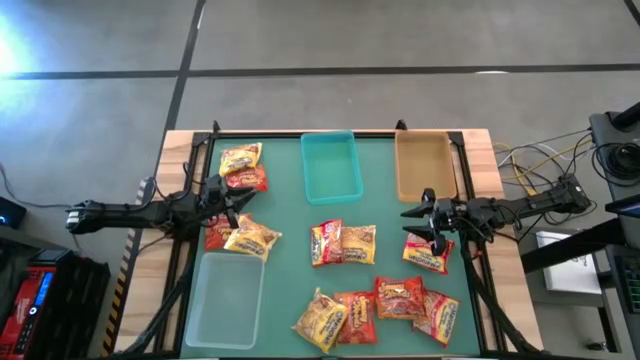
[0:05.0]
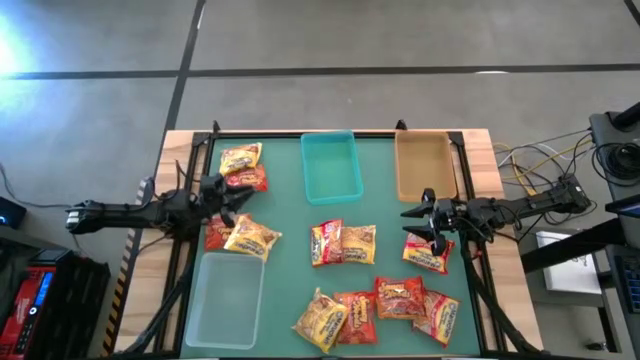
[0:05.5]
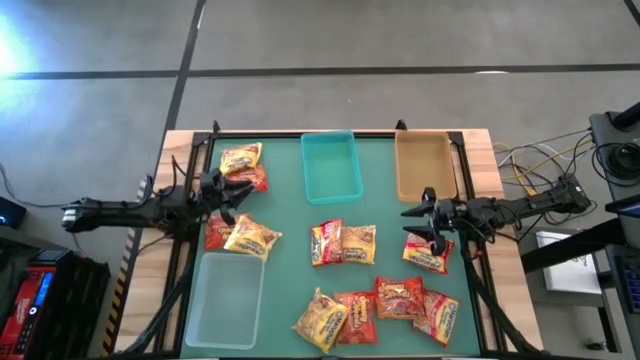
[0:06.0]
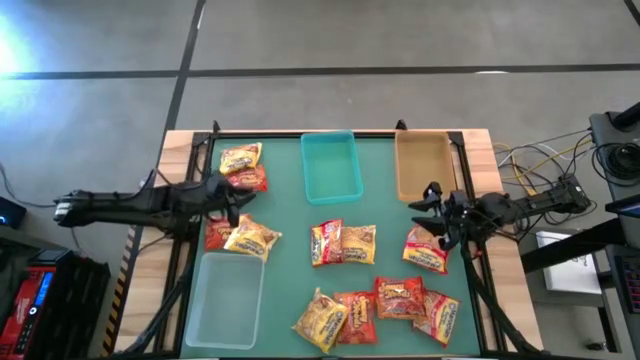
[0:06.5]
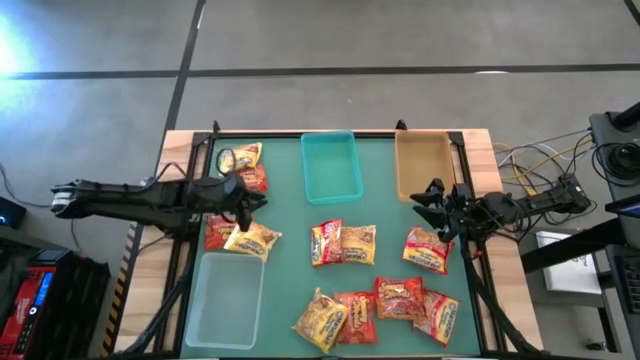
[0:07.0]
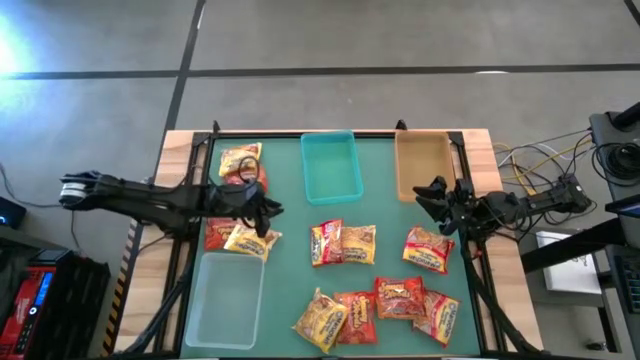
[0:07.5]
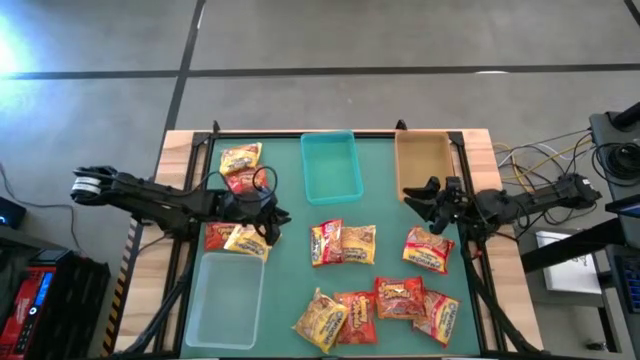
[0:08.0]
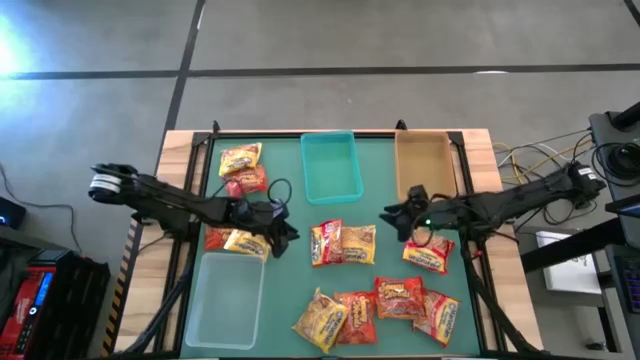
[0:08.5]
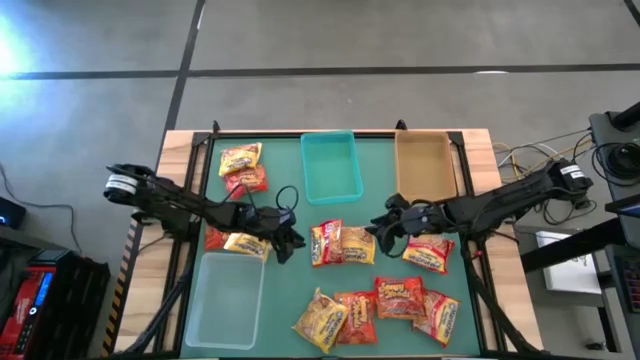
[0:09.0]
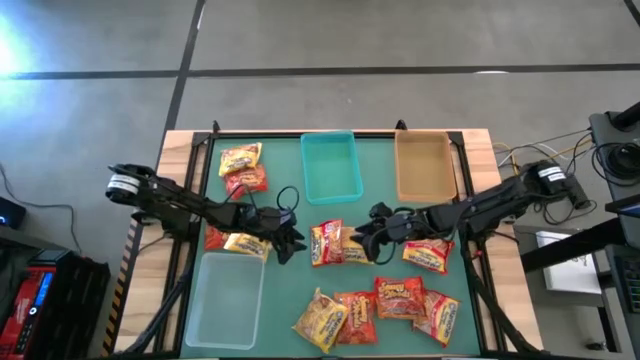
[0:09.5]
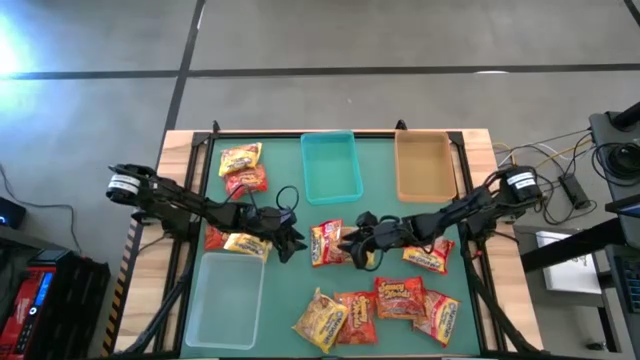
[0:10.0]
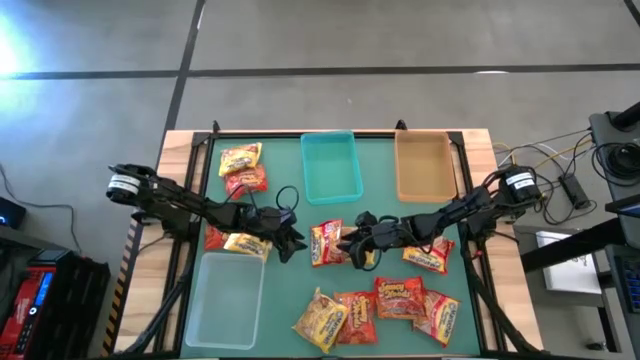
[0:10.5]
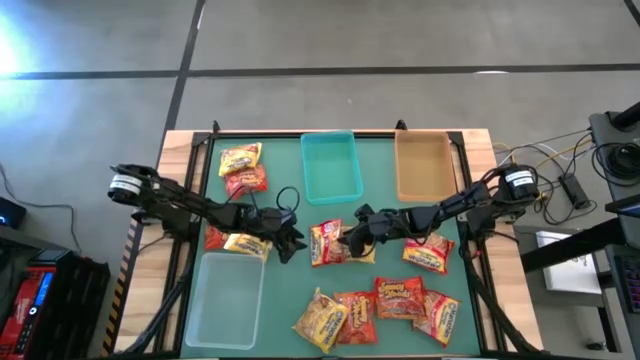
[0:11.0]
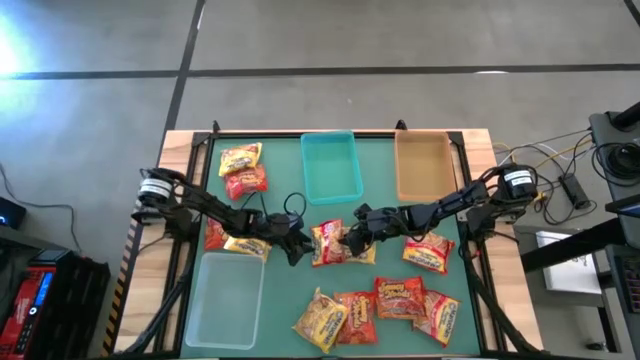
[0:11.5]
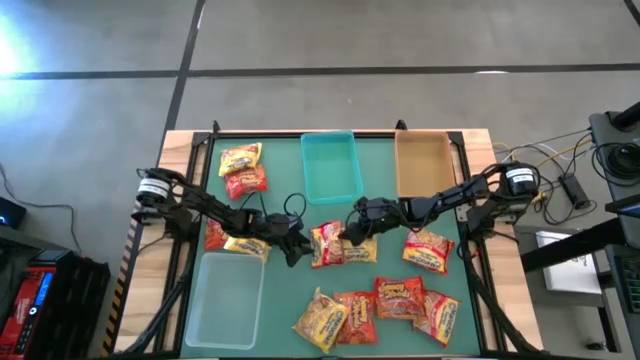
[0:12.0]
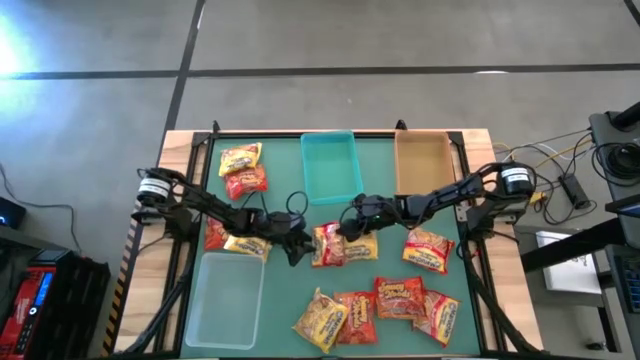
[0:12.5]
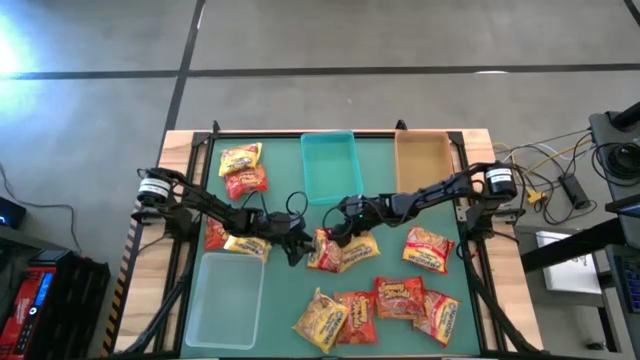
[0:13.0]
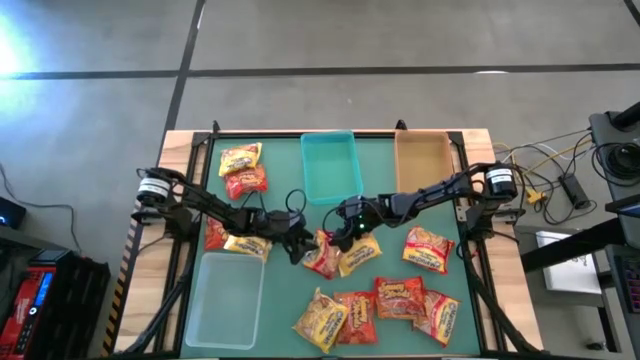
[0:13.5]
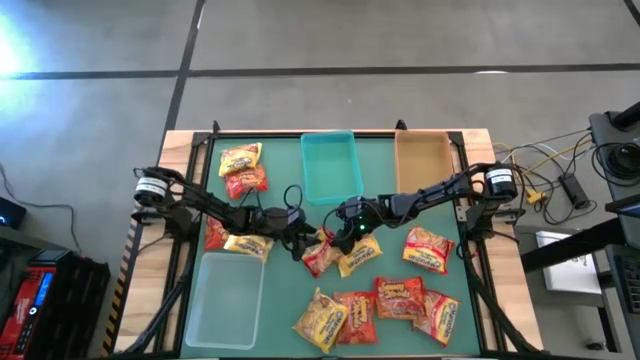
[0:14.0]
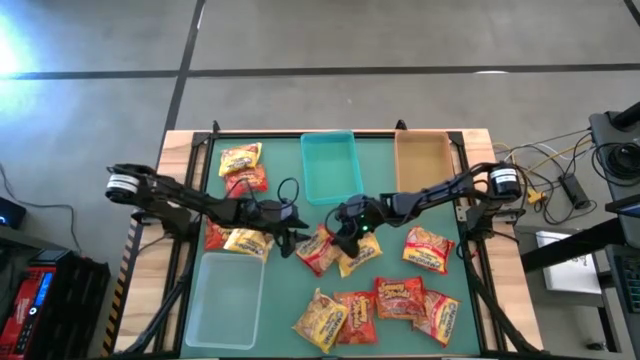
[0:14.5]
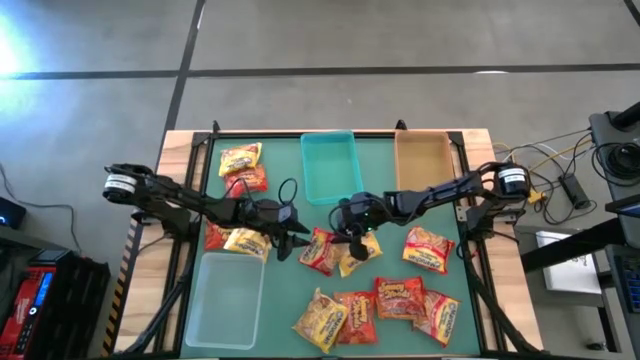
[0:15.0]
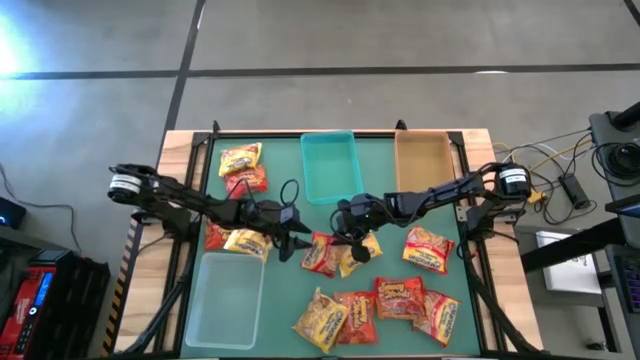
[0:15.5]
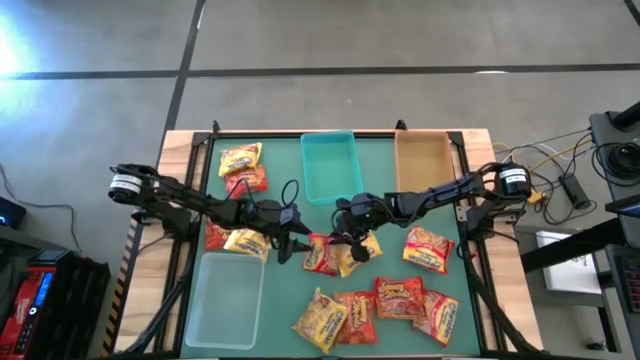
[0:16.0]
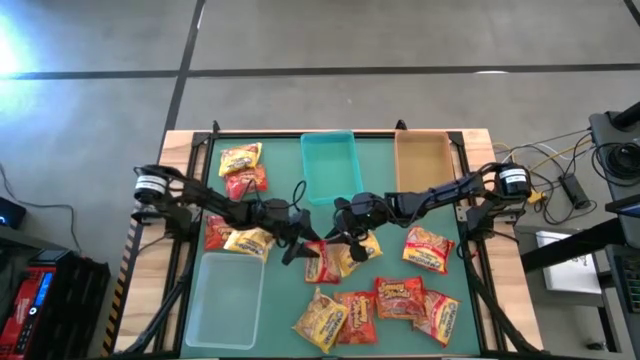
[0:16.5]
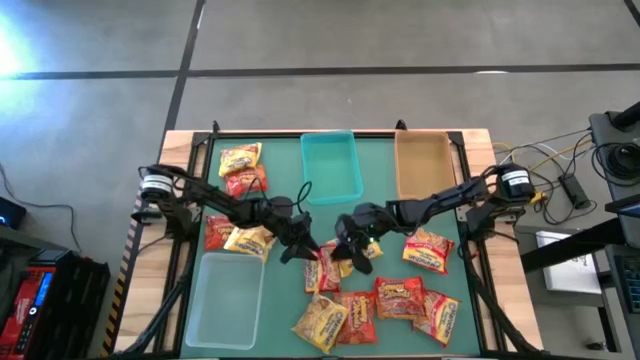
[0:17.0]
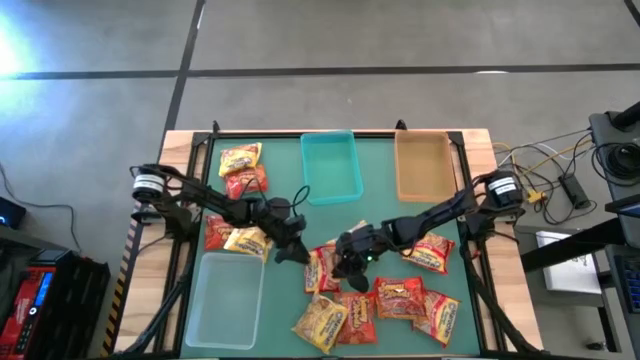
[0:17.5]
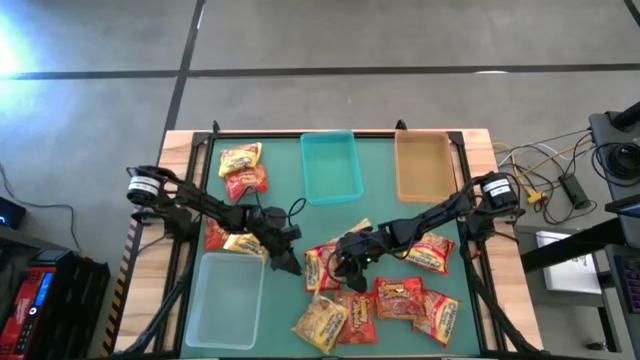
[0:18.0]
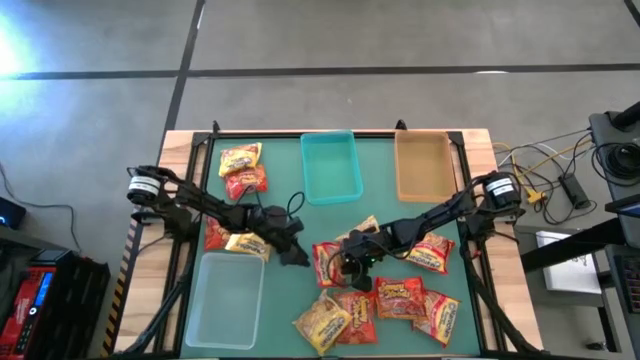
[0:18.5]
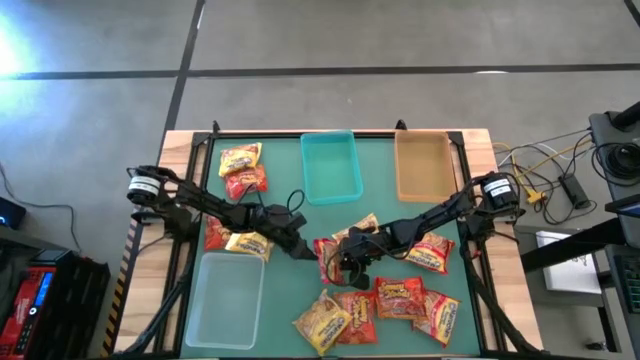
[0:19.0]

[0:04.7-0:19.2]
Task: Sort Maruchan noodles
Put the center red noodle pack into the green bin

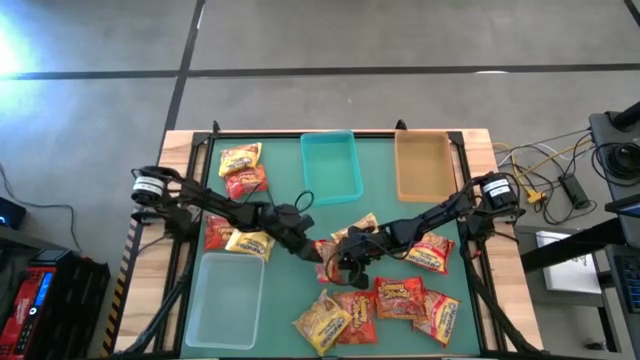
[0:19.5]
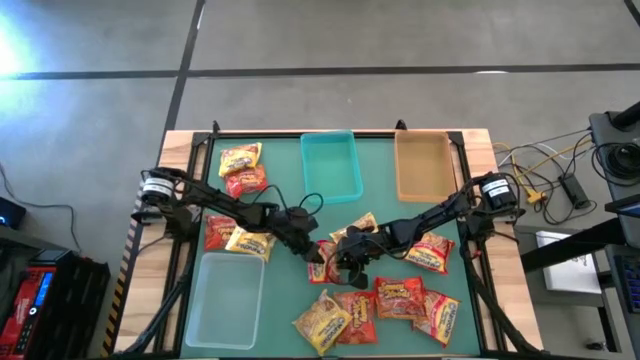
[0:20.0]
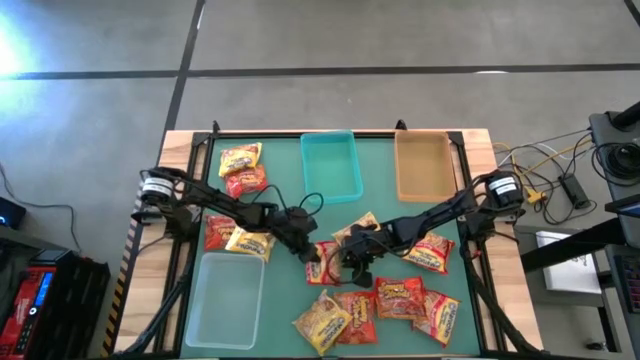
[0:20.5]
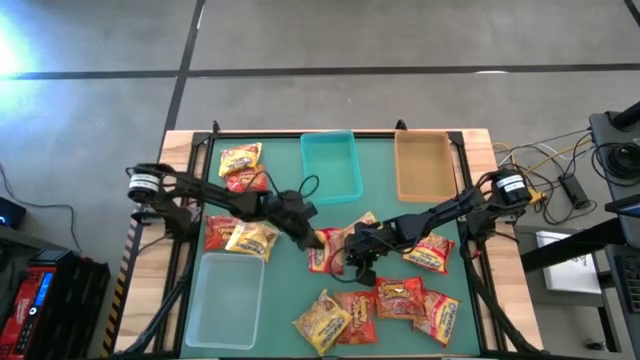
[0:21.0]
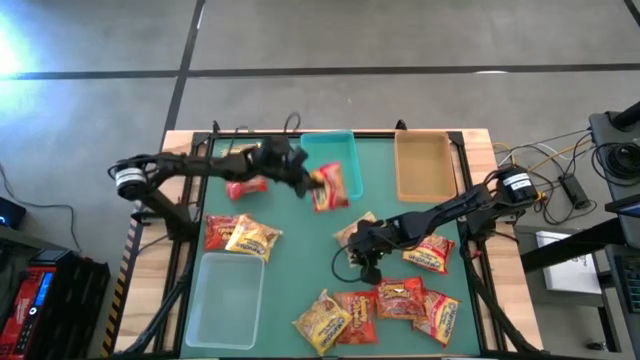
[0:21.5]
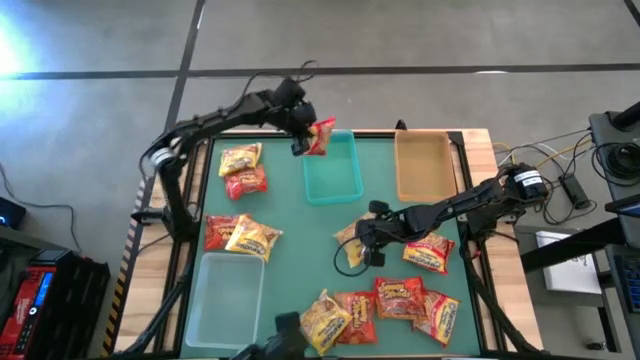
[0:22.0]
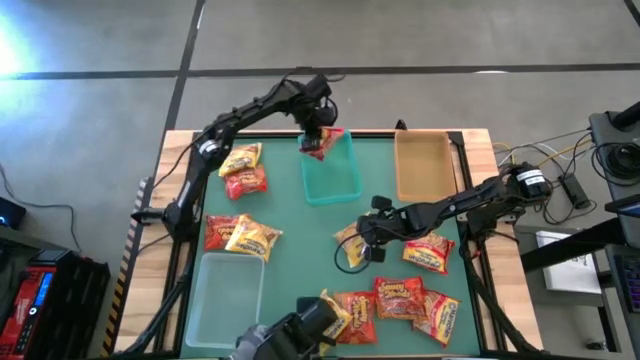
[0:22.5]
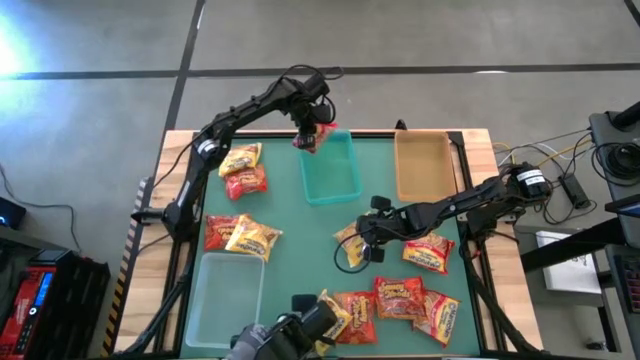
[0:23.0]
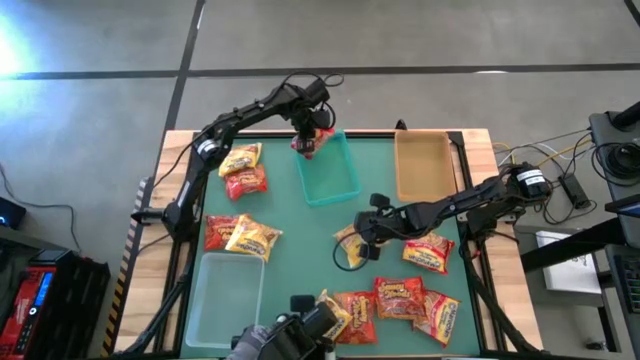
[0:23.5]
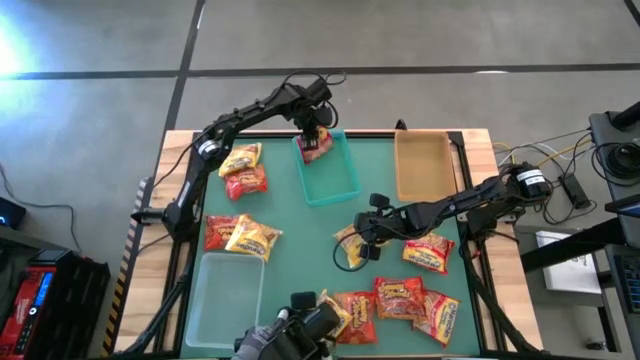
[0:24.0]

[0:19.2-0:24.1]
Put the center red noodle pack into the green bin

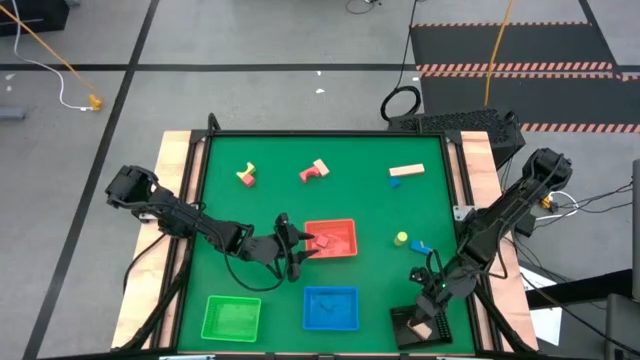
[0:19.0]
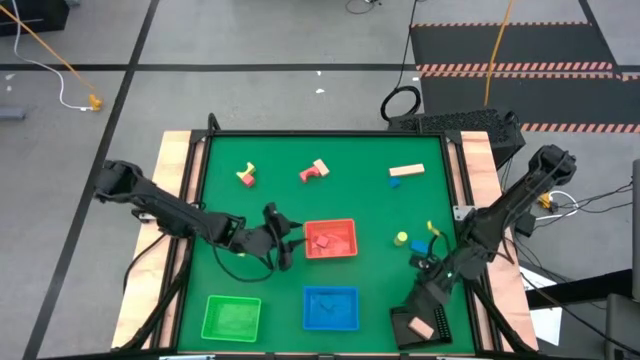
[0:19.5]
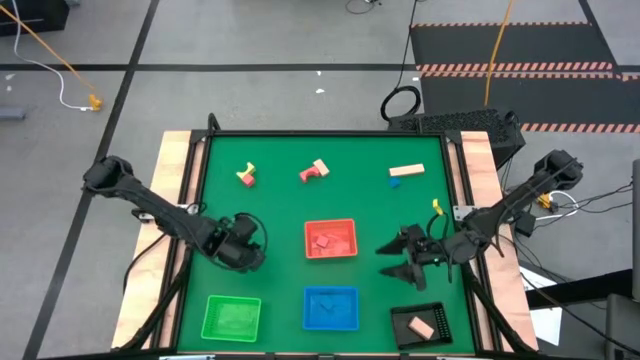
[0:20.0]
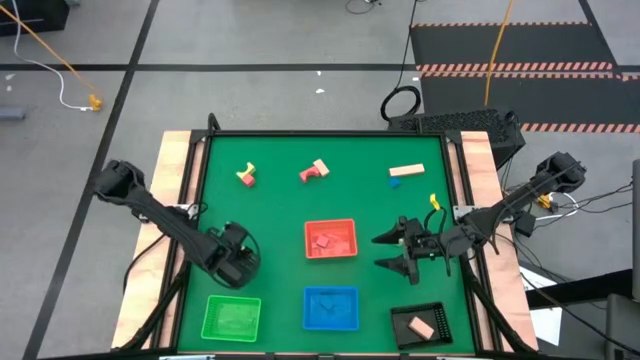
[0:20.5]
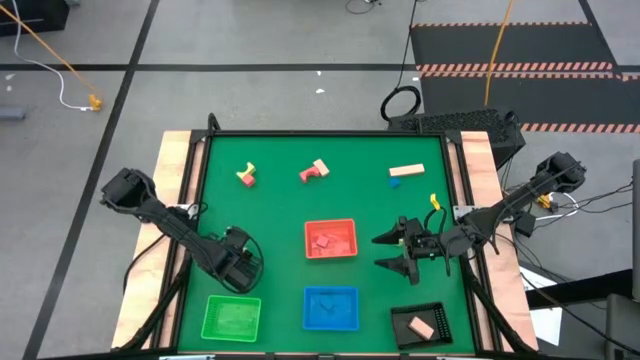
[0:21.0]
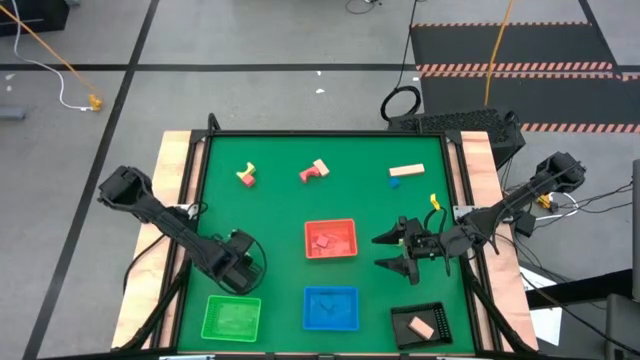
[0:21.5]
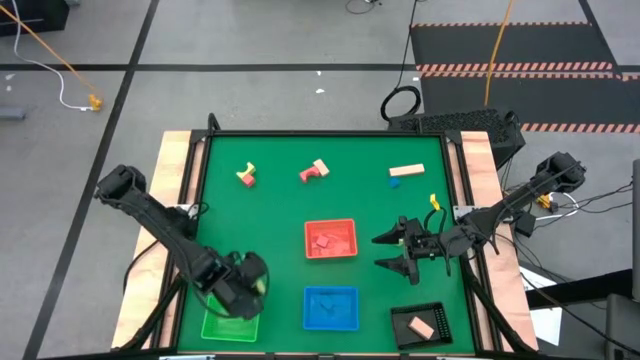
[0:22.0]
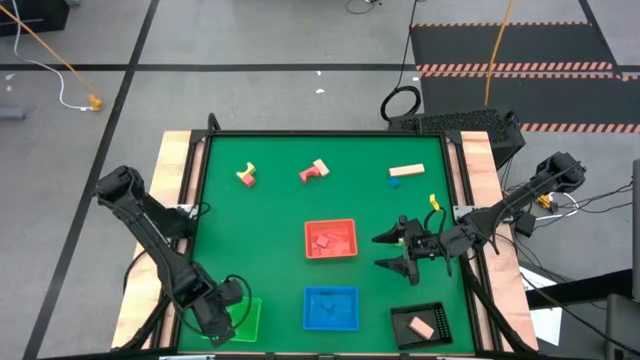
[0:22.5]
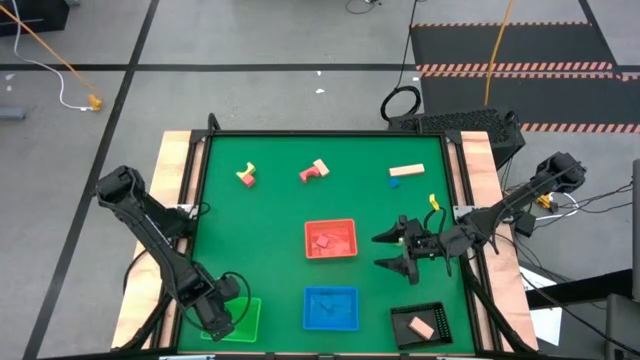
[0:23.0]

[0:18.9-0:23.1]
Task: Sort & place blocks by color
Put the bottom left green block into the green bin
